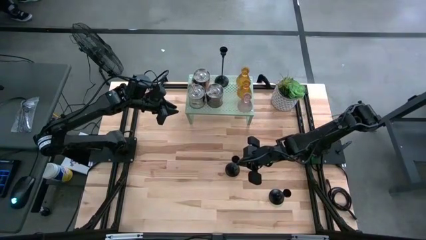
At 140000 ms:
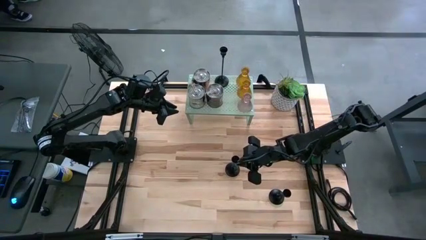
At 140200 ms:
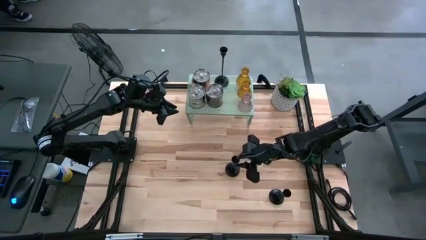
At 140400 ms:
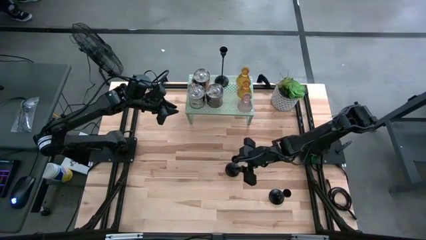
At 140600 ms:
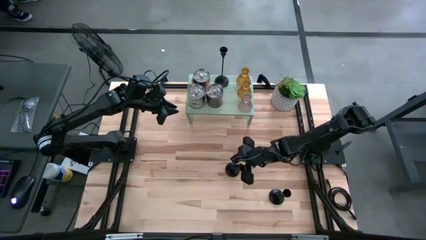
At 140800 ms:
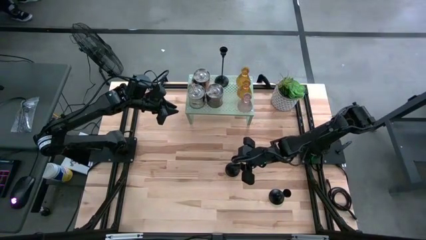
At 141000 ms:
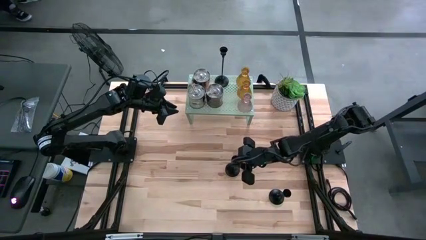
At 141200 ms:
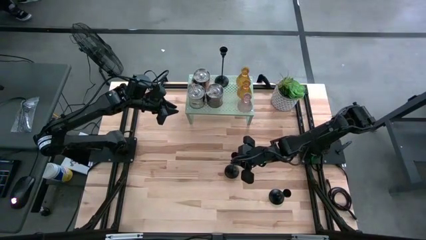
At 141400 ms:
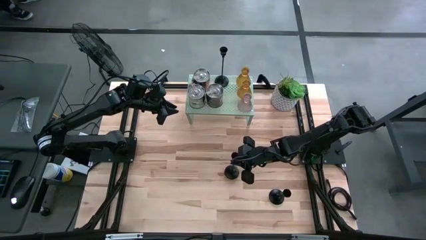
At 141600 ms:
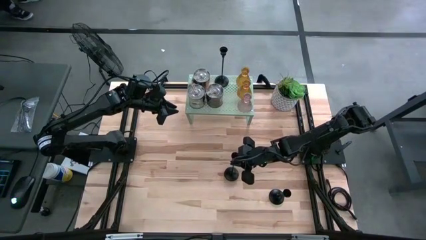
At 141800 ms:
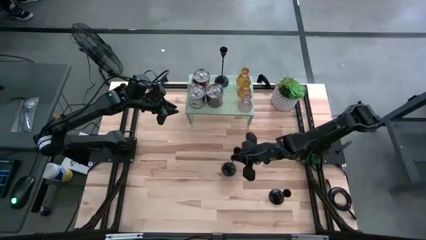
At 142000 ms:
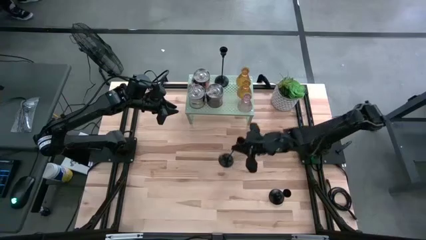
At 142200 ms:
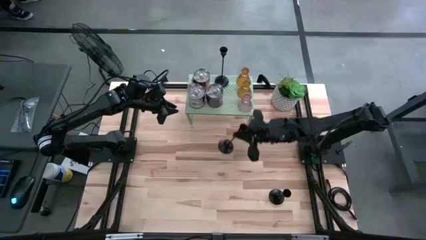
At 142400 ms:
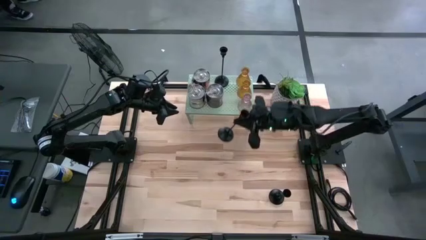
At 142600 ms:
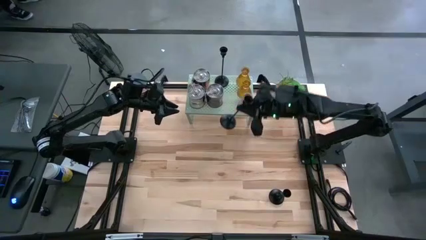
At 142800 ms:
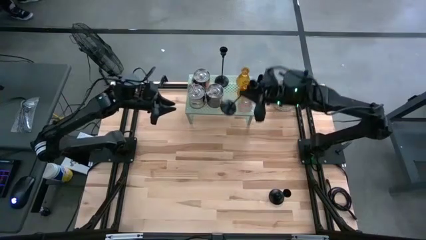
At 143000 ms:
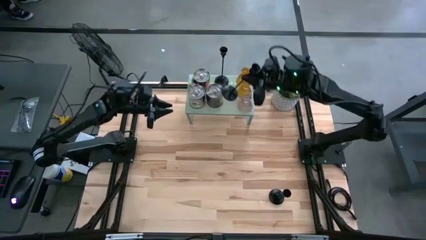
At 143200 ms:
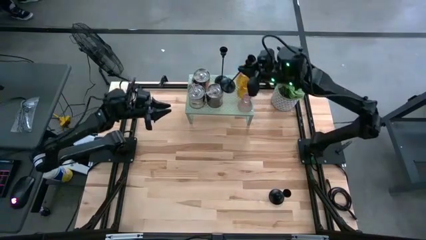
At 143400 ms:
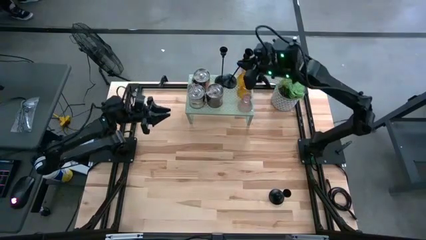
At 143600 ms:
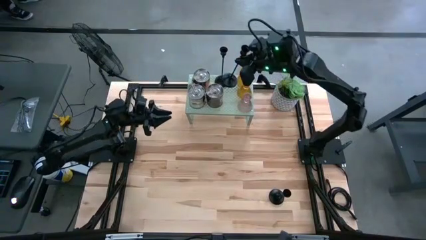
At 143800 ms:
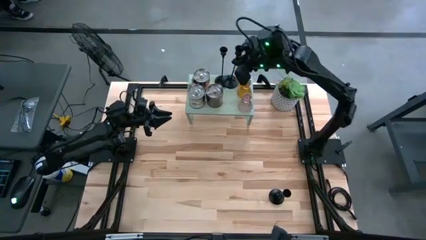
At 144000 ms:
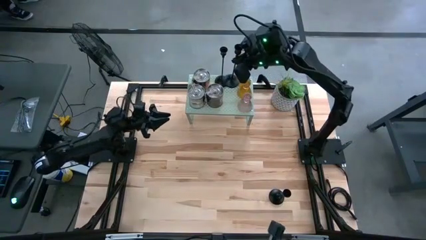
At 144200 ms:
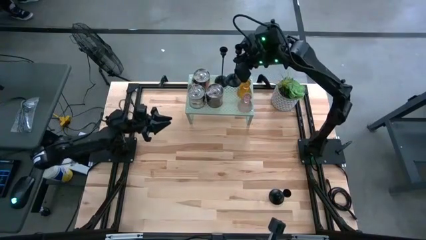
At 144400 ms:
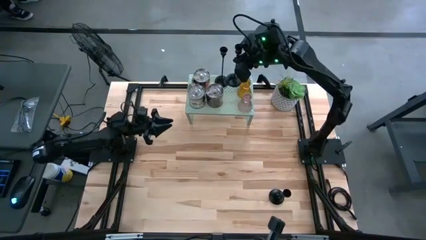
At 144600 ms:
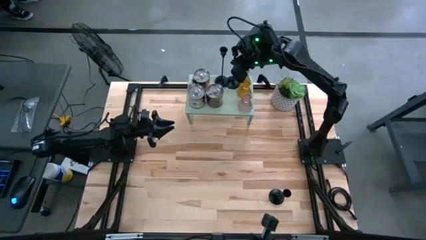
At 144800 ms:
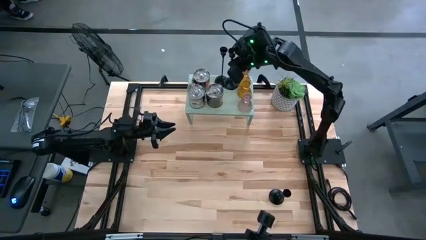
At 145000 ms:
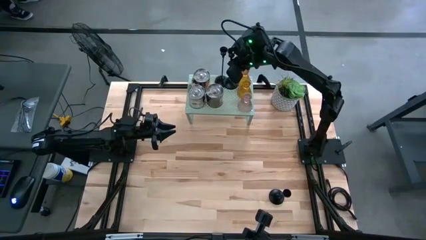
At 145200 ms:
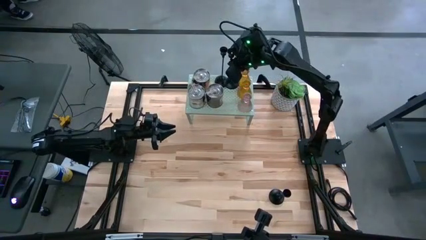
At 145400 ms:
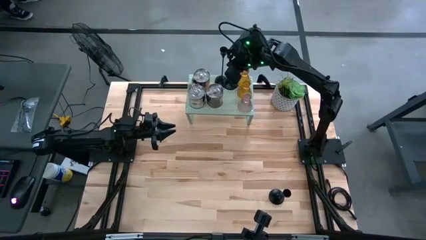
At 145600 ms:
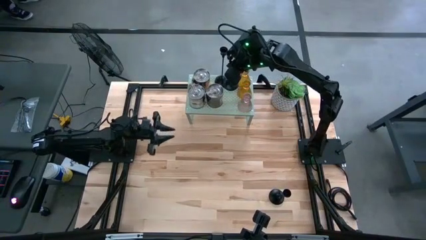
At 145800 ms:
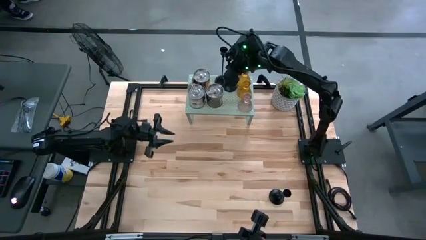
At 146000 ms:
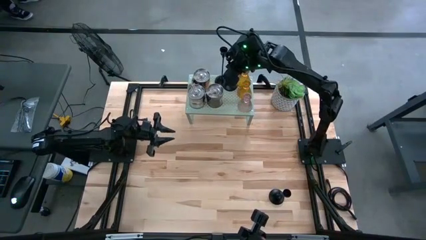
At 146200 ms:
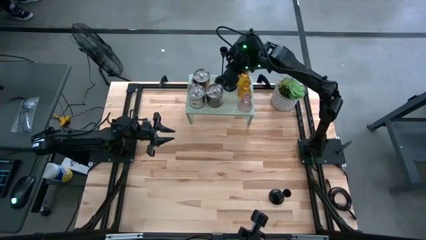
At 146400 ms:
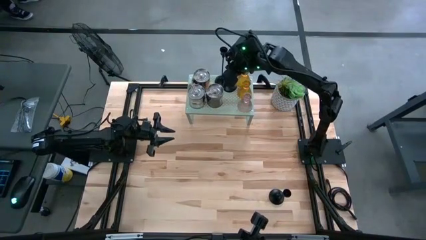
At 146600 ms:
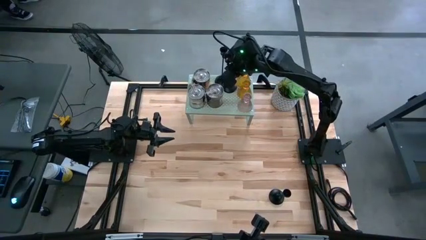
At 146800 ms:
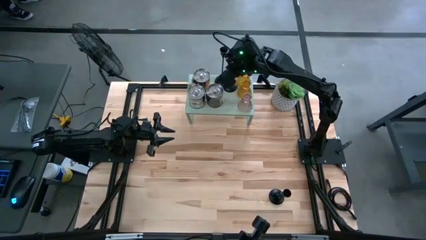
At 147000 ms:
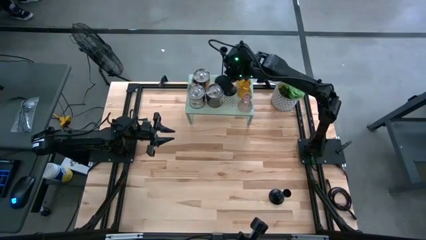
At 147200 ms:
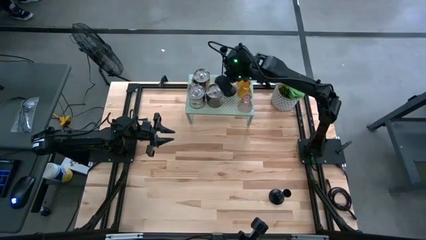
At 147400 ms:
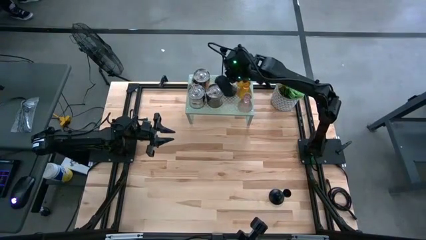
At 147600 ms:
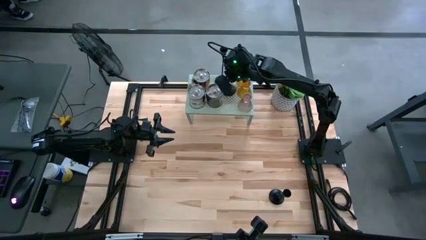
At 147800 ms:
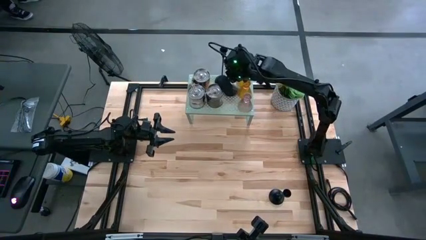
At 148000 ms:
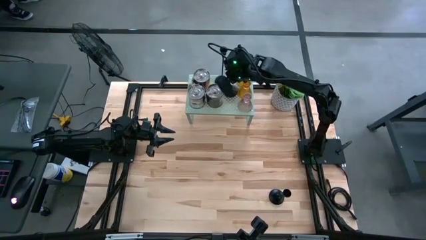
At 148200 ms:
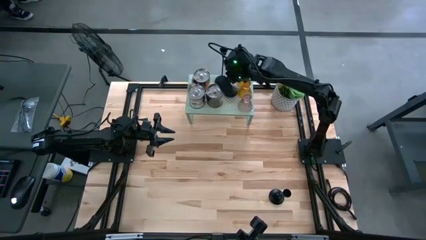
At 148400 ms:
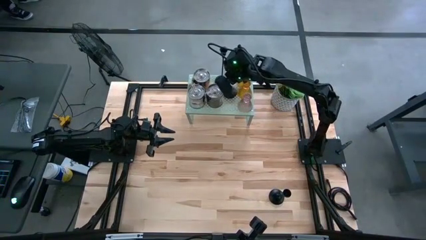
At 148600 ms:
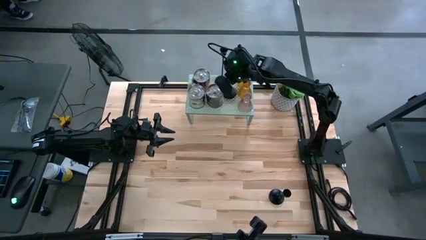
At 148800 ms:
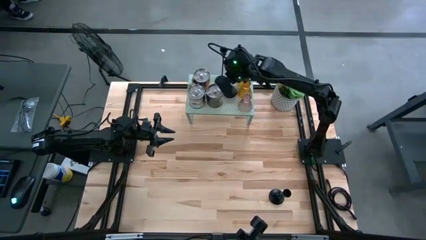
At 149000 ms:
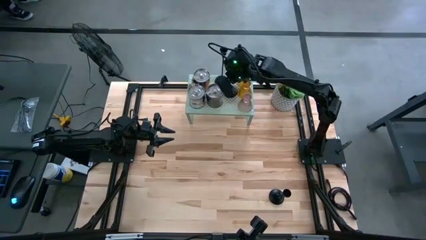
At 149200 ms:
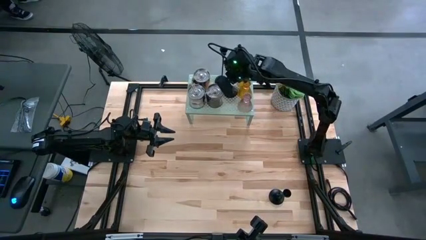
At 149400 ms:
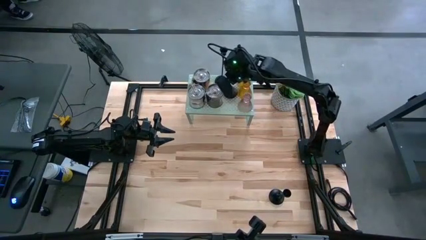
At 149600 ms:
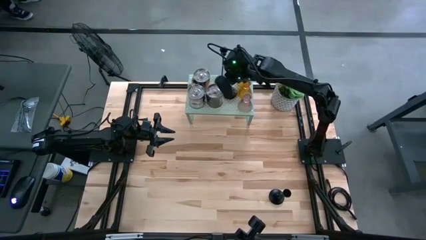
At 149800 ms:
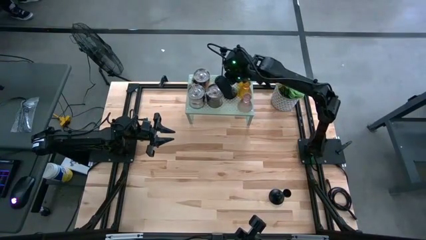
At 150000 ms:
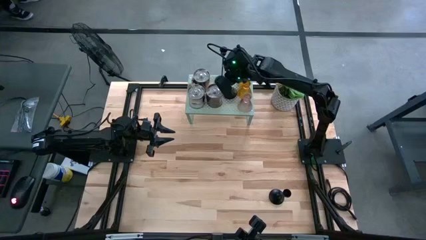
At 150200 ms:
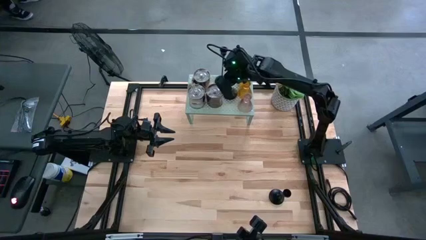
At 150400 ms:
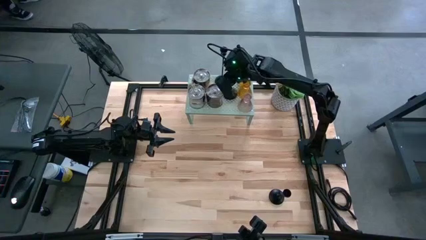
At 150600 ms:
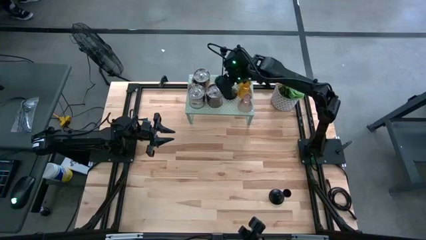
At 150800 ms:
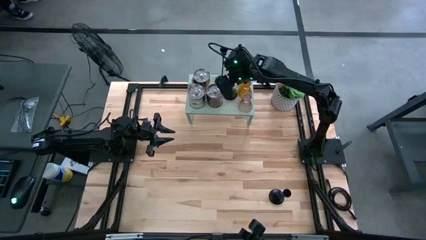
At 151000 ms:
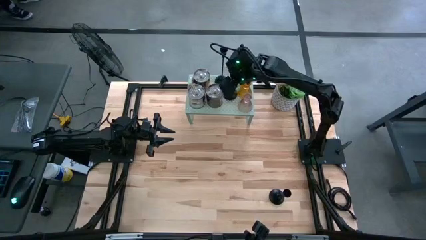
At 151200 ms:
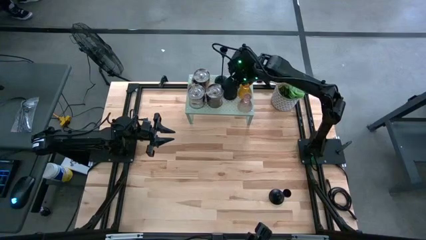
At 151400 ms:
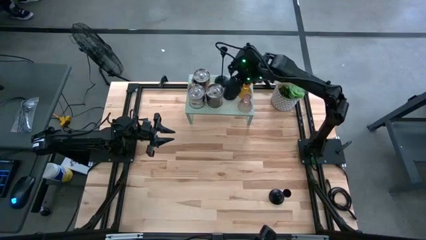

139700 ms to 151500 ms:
Task: Pick & Place candle stick holders
Put the top black candle holder on the shelf
